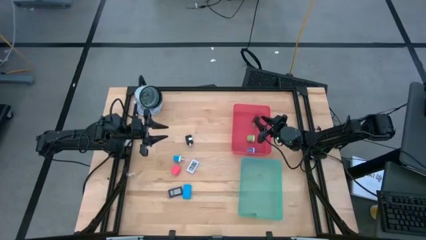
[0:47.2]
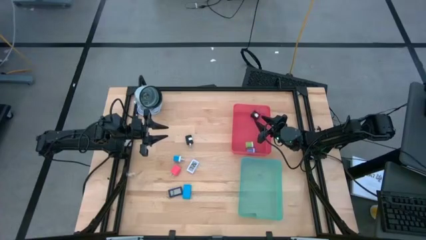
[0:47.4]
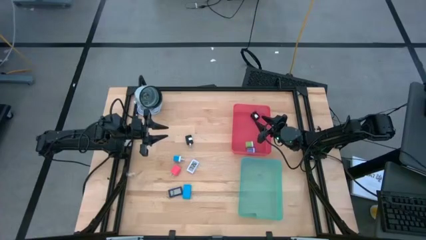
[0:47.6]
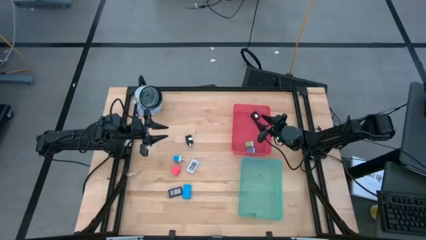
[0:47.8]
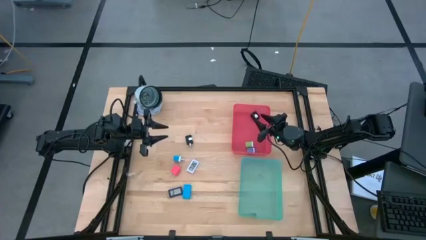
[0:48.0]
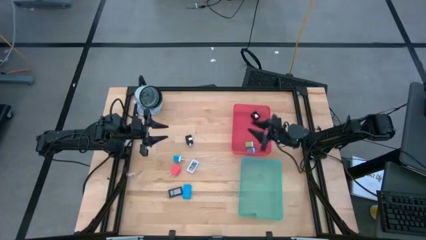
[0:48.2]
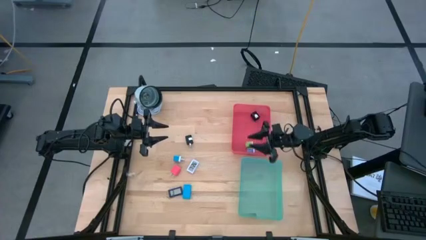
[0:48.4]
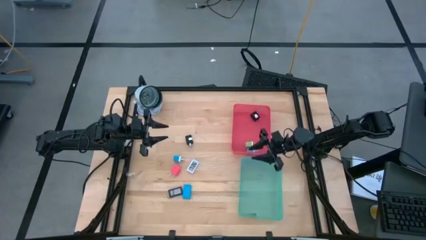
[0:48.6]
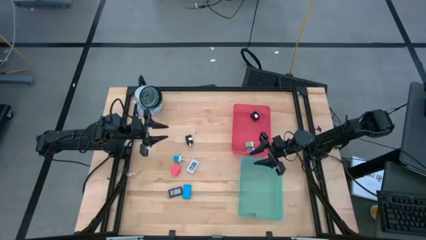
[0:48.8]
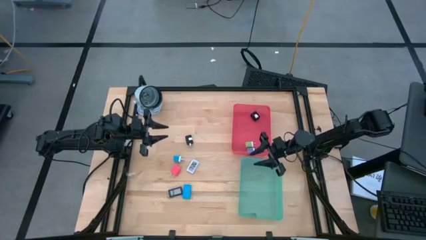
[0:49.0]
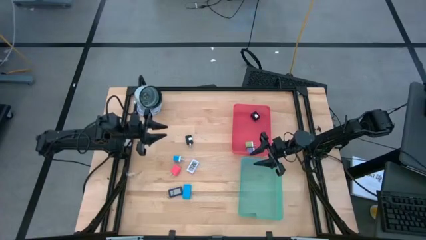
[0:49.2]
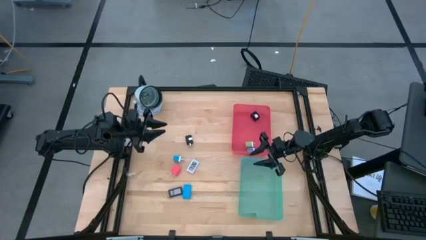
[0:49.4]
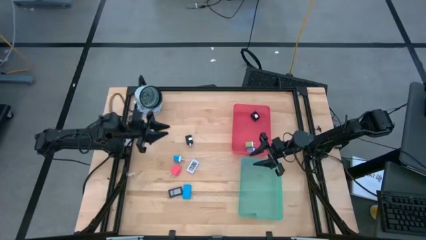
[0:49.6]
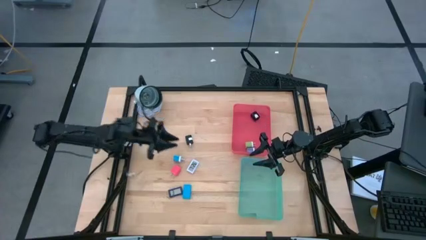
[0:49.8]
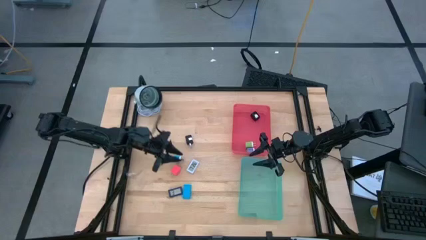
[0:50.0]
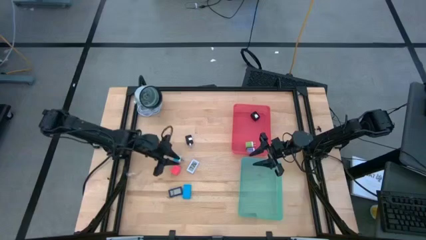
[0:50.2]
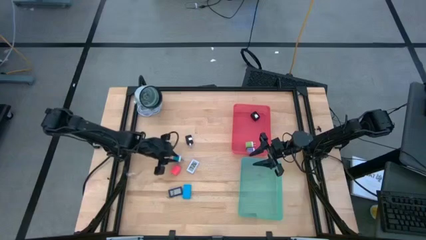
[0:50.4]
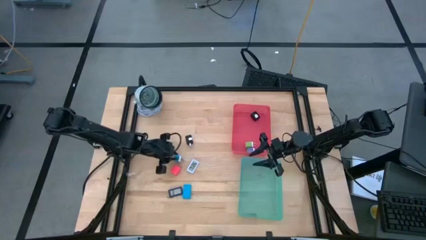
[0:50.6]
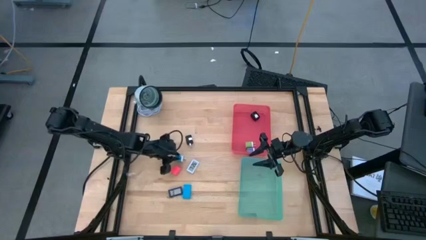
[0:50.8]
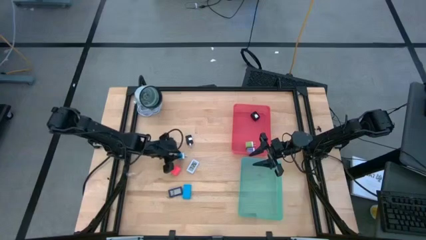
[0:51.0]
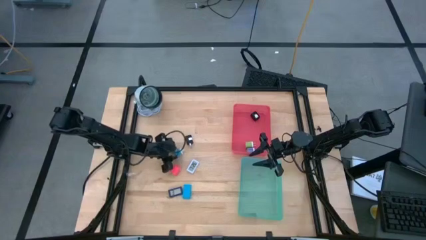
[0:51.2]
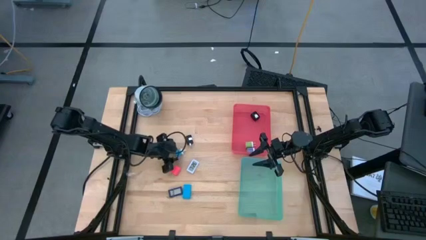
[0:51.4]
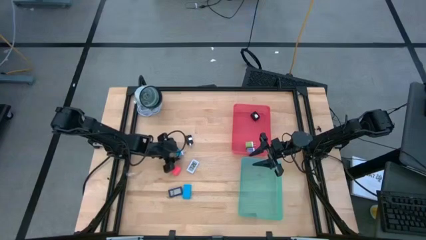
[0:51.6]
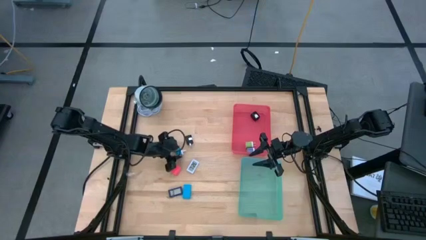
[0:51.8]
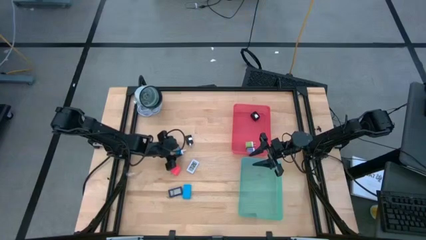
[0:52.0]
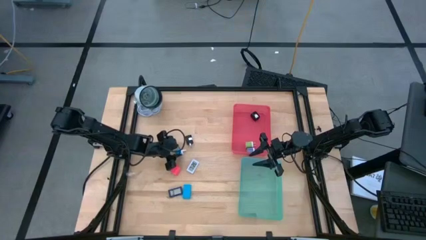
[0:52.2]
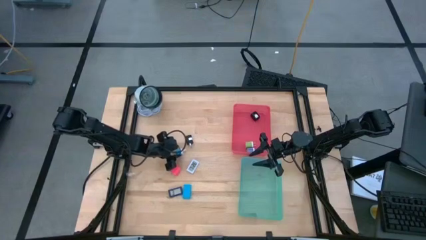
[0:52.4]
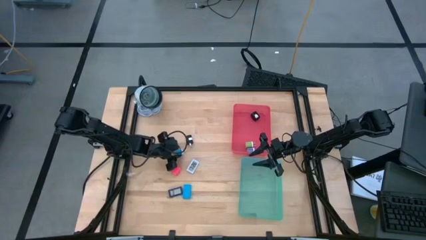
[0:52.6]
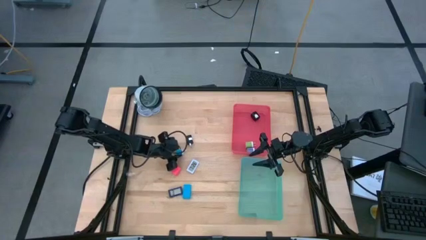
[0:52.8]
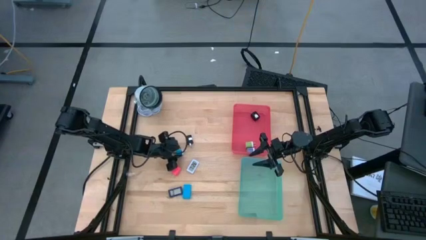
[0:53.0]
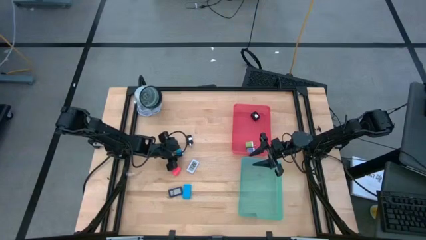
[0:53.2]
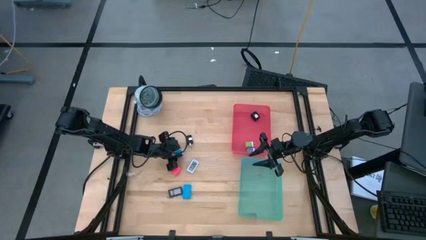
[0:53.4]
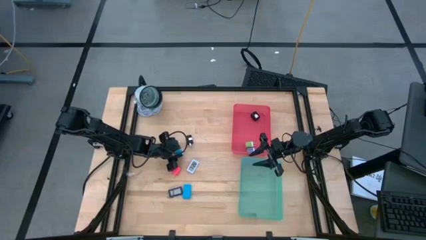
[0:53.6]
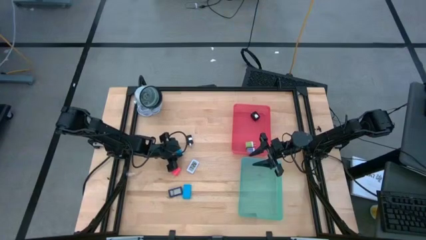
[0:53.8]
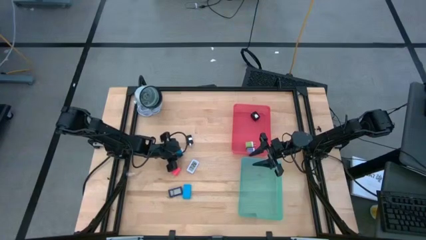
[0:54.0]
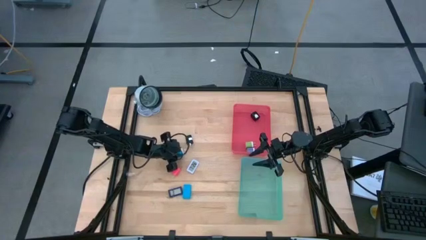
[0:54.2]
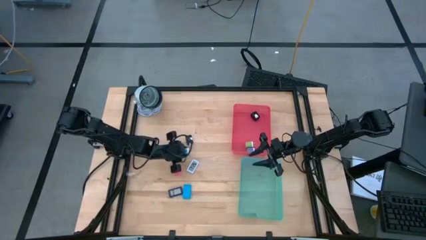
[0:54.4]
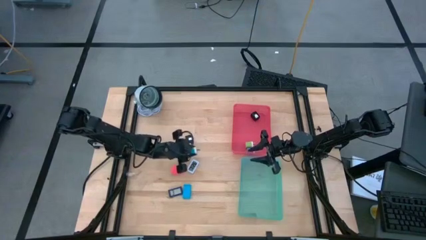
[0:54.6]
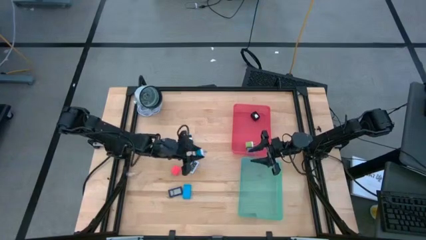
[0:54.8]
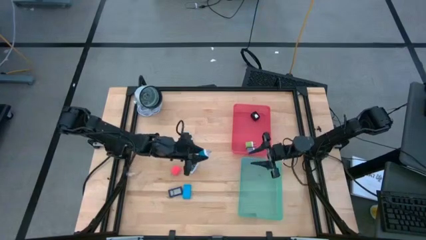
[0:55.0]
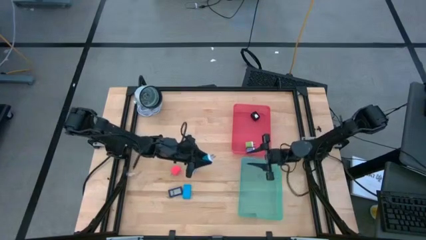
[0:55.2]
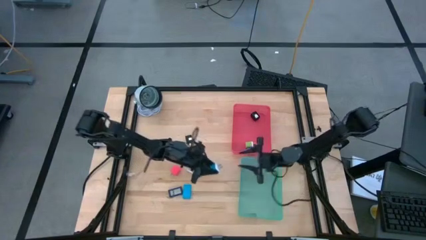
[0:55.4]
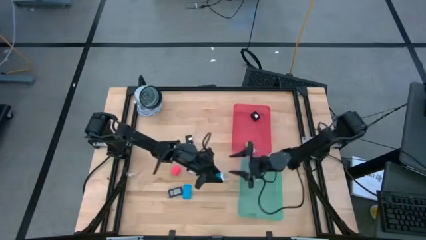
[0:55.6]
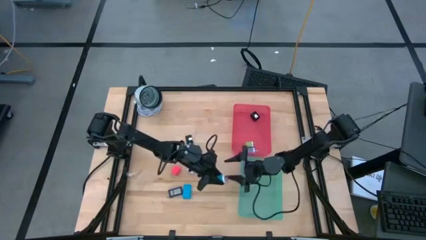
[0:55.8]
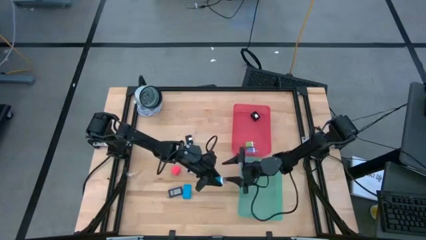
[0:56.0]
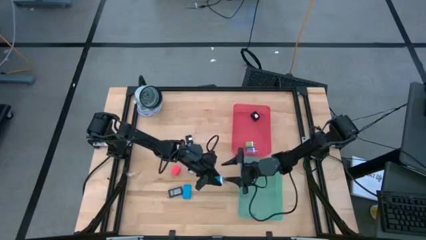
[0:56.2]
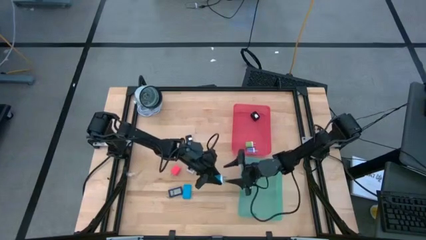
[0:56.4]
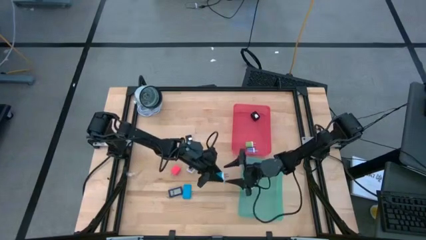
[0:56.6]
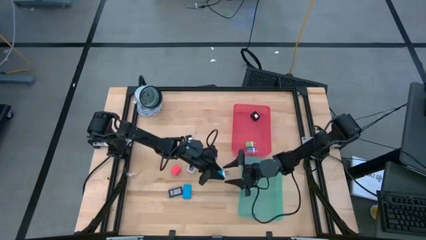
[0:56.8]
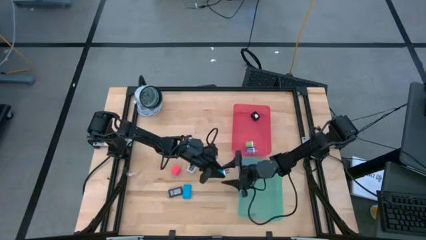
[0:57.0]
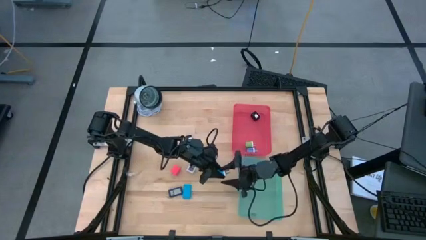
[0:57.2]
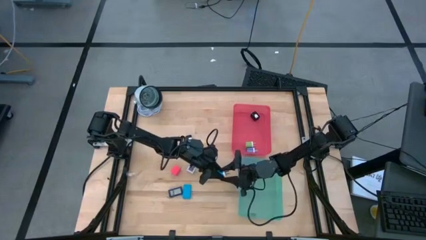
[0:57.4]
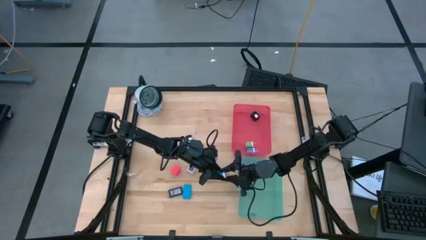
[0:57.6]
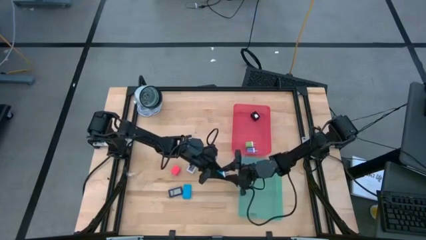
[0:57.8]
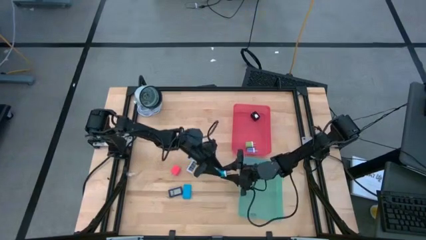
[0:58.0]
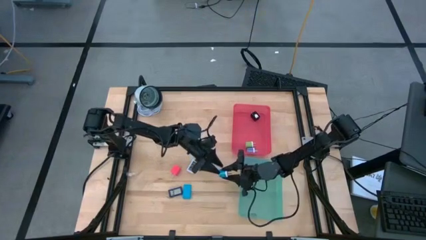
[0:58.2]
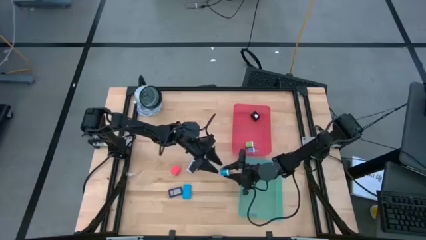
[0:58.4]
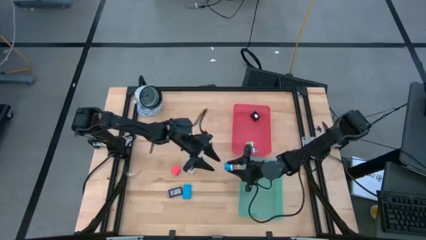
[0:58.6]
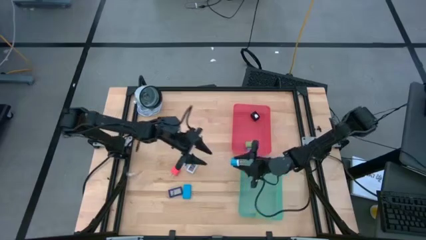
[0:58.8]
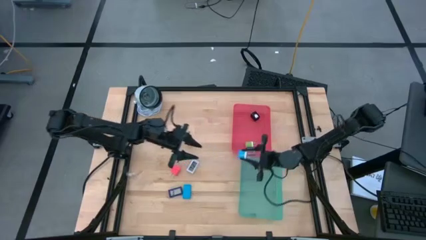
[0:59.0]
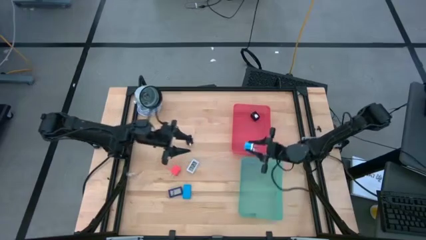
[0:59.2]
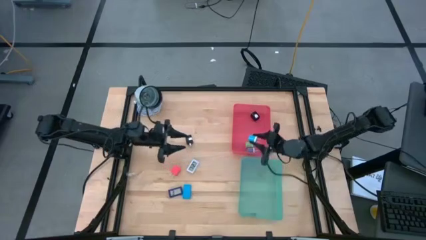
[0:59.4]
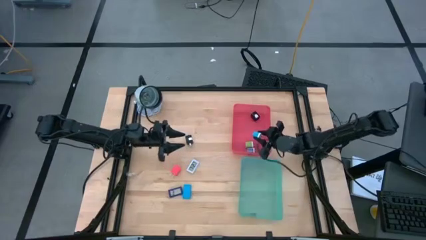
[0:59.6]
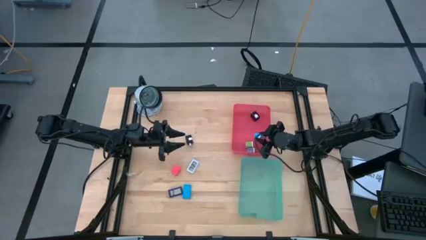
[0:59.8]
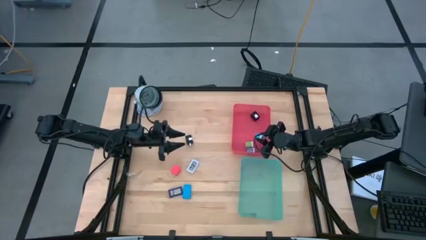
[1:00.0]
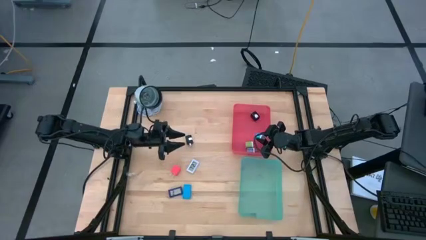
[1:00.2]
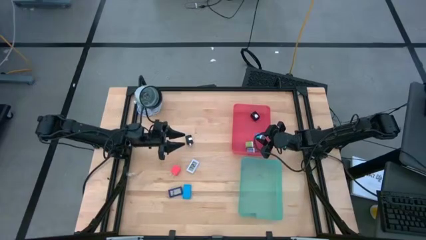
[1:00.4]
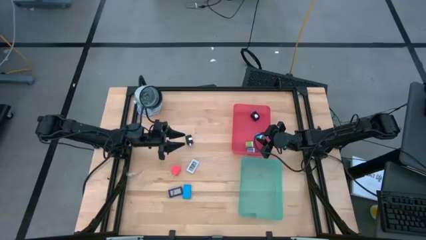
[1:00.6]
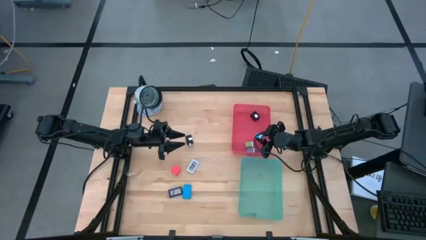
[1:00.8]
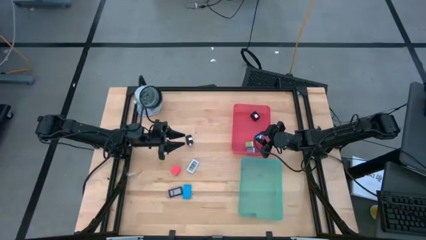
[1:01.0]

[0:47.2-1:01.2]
Task: Pick & Place Office items
Put the blue charger adapter into the red bin
